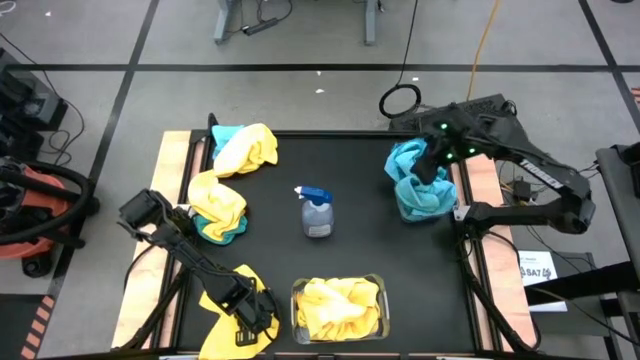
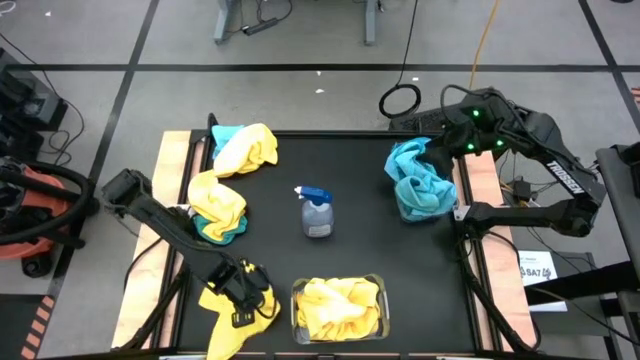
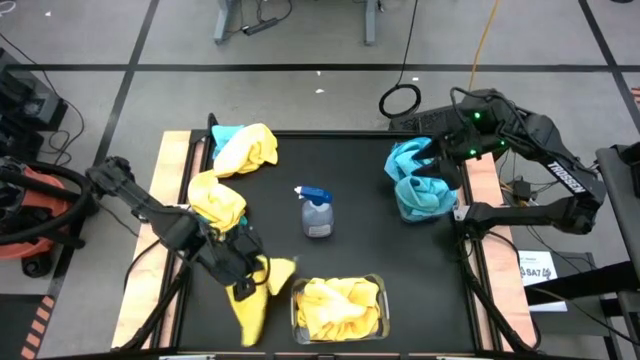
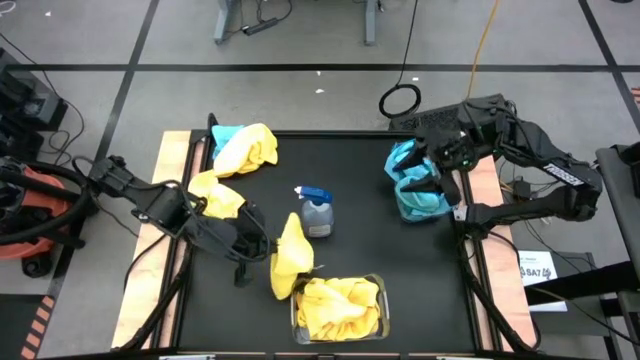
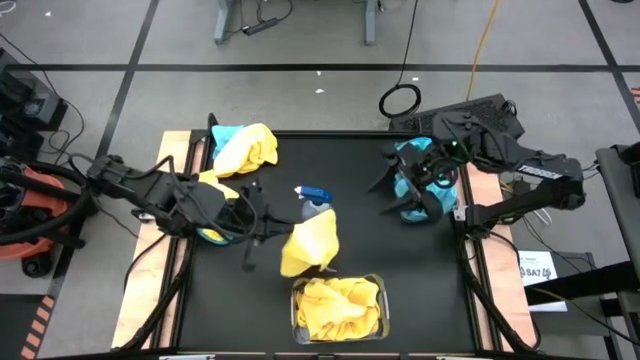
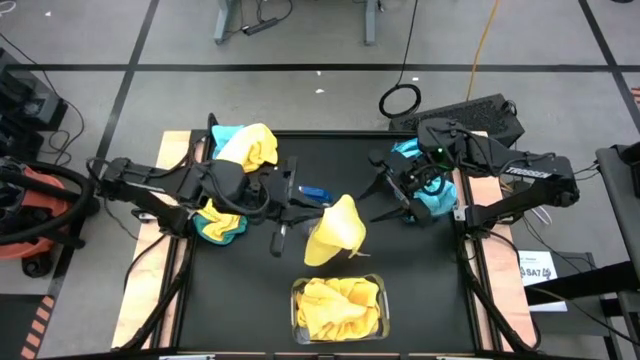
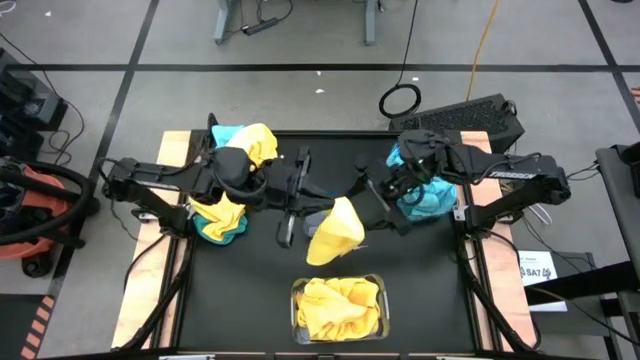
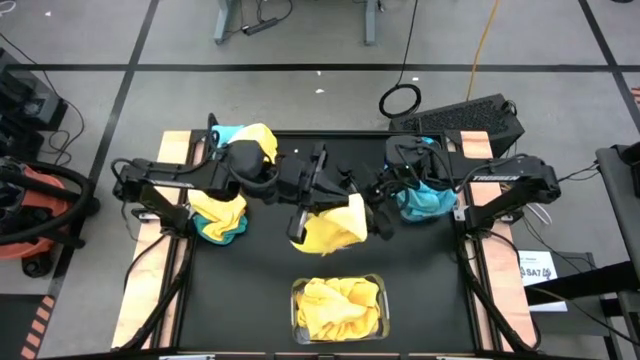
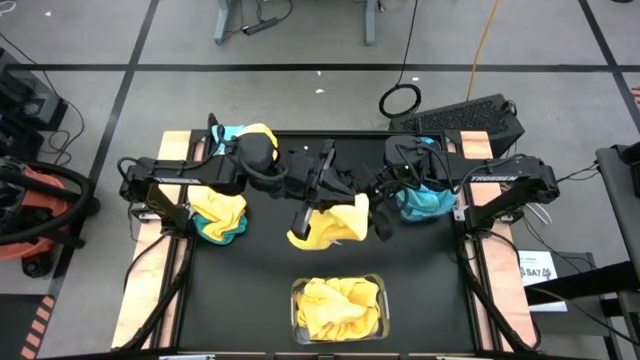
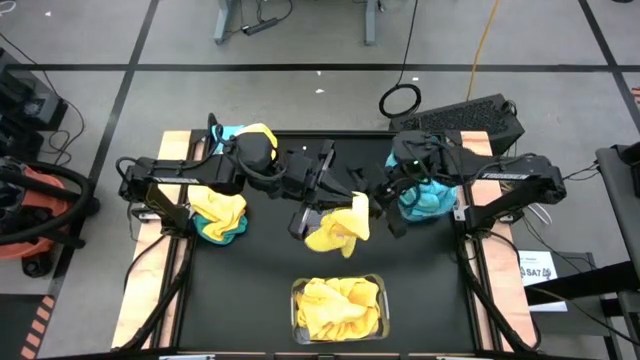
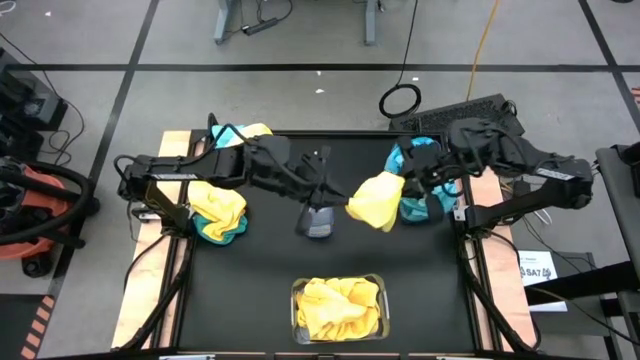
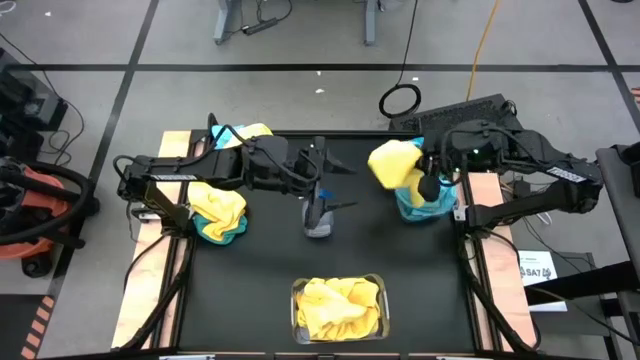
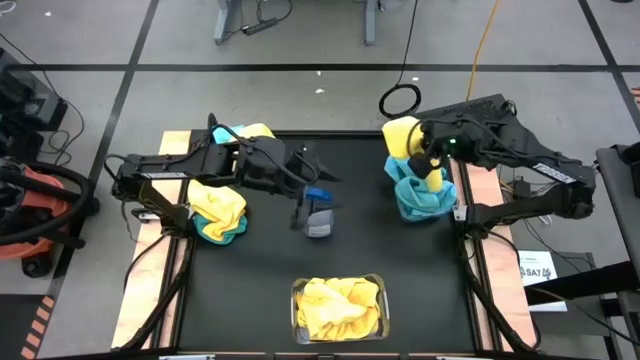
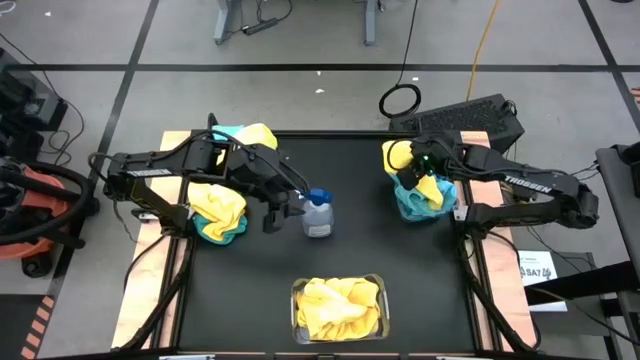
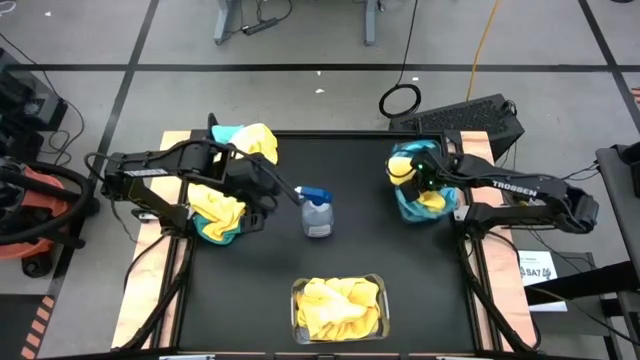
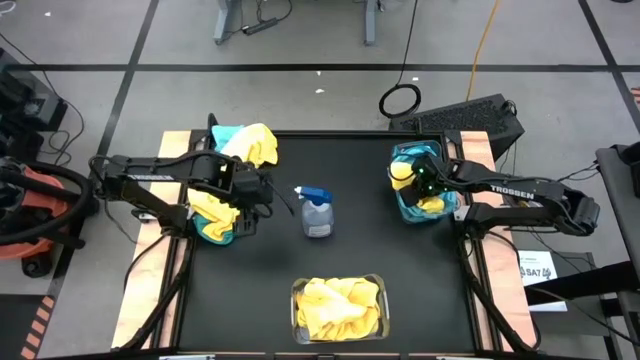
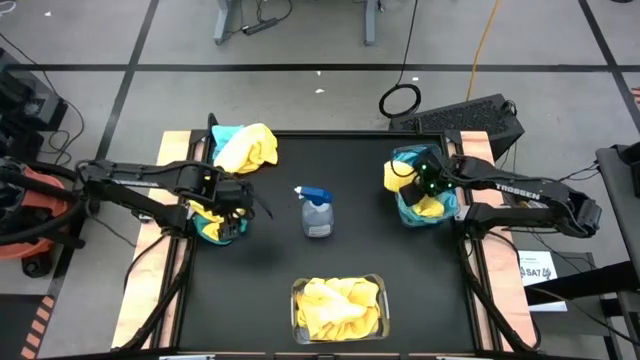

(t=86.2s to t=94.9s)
Task: Sort microfiber towel by color & place in baskets
Put the yellow towel into the bottom transparent bin

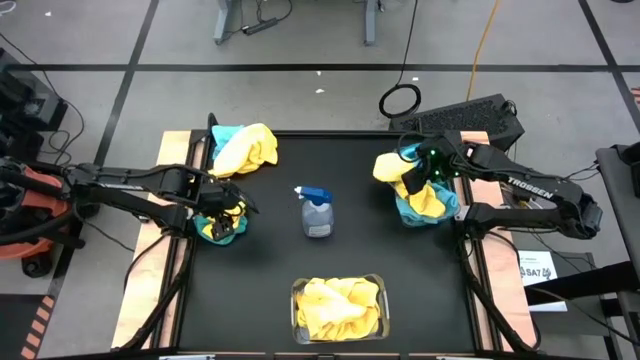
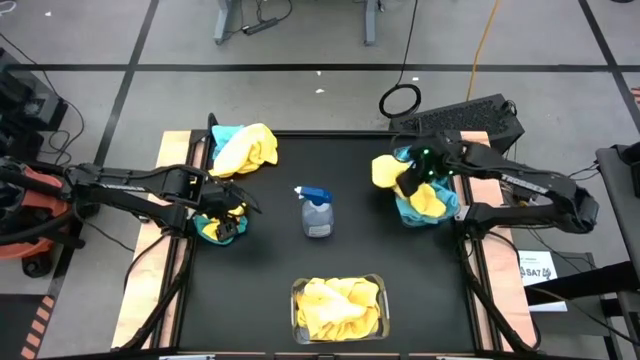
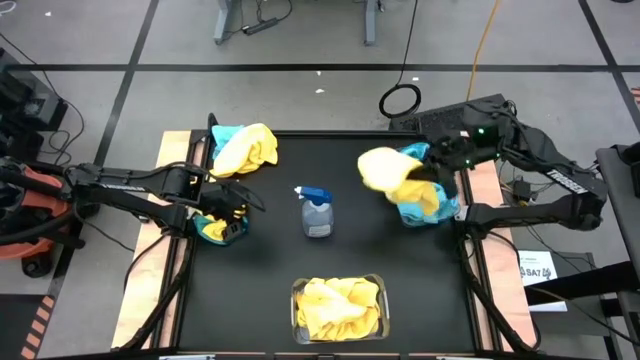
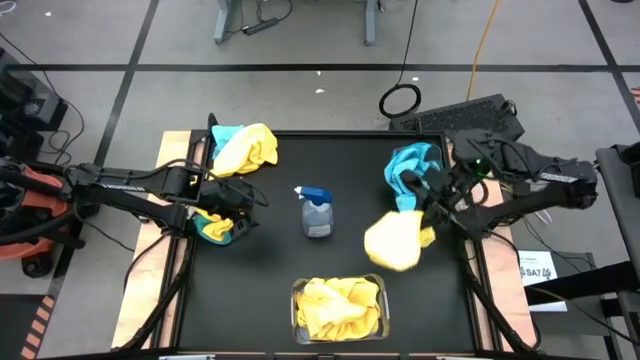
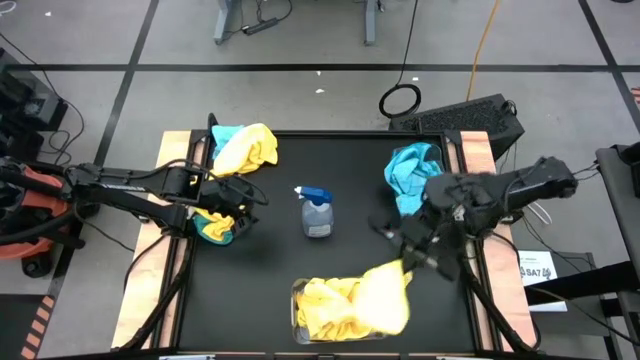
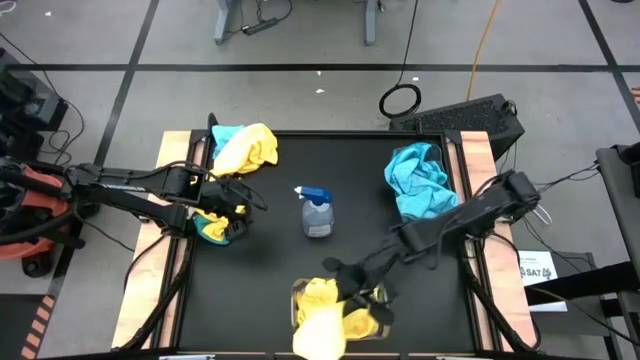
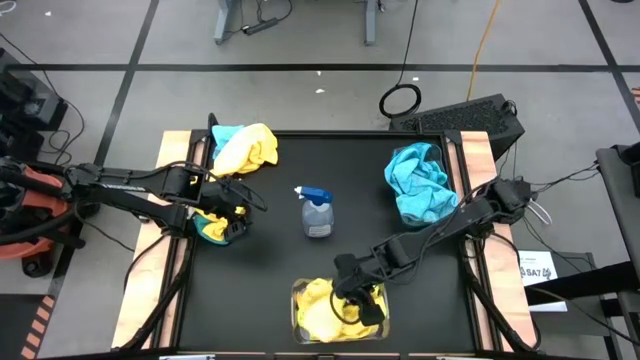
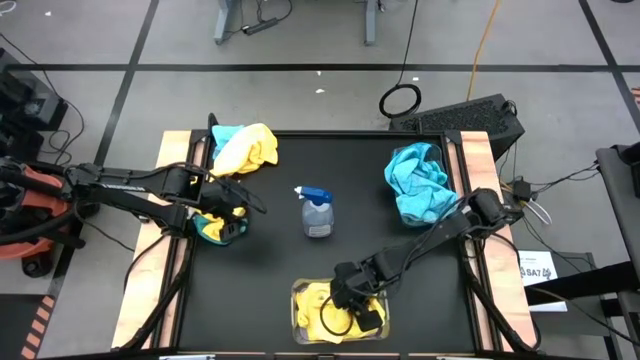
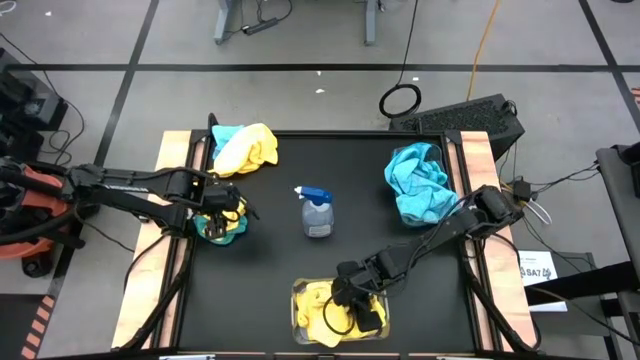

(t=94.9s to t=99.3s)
Put the yellow towel into the bottom transparent bin

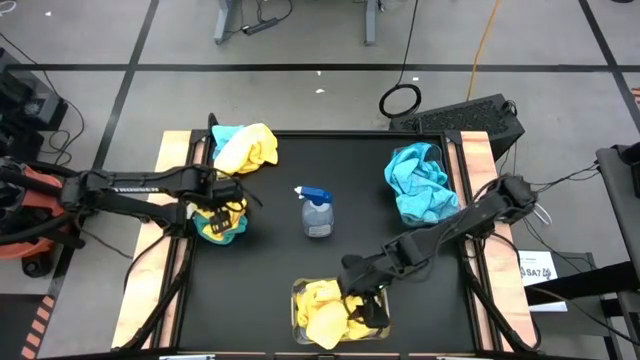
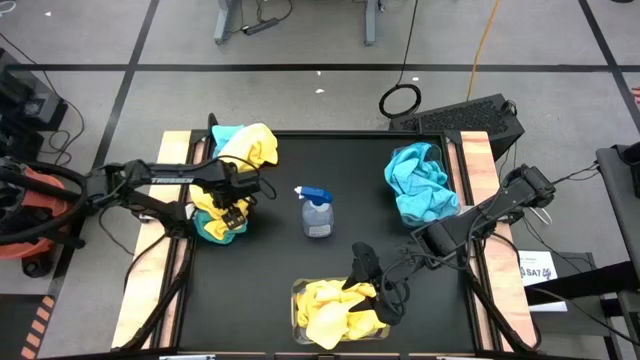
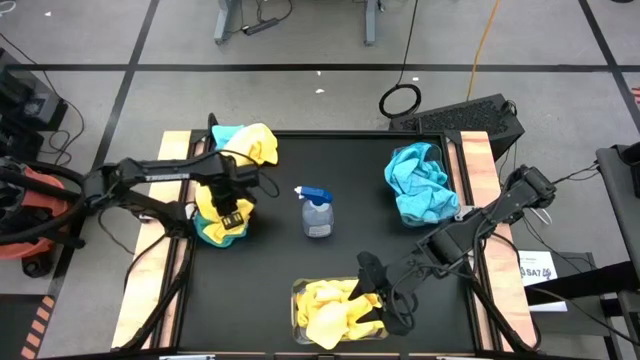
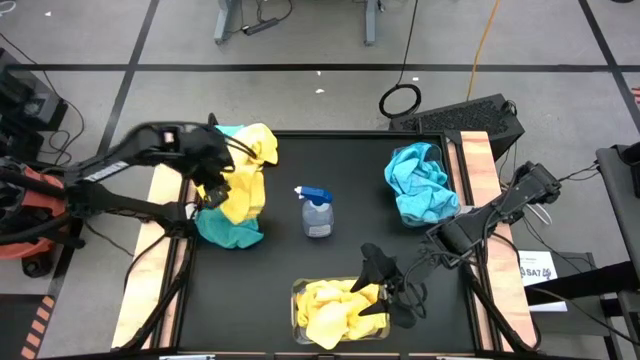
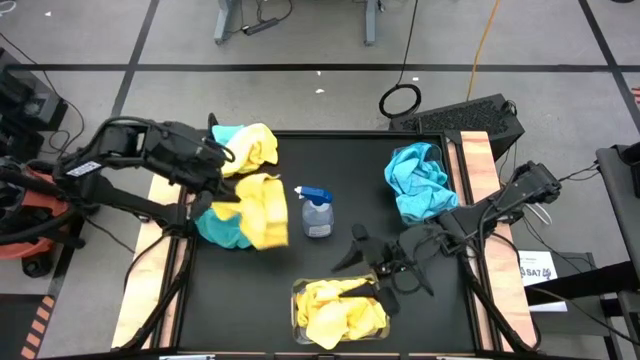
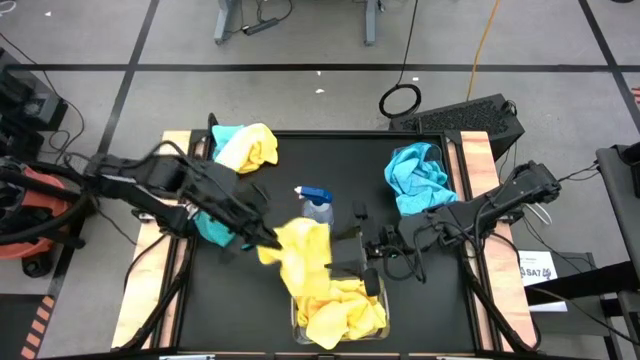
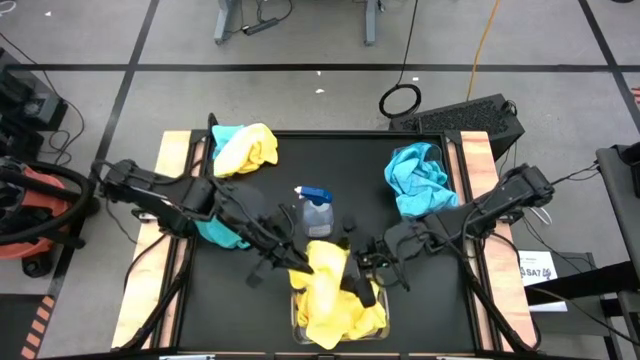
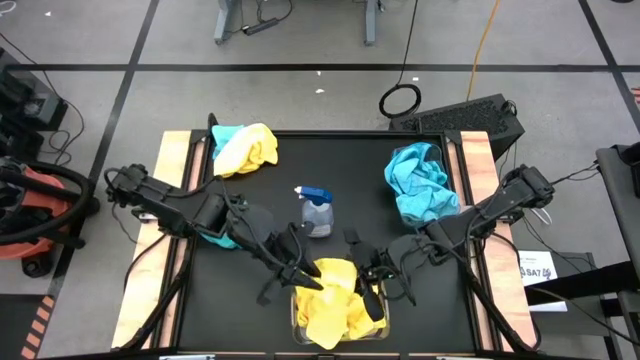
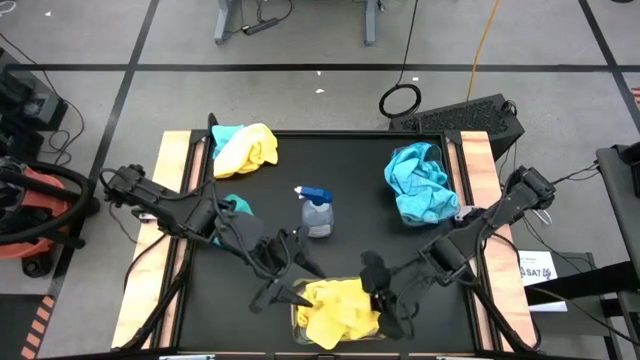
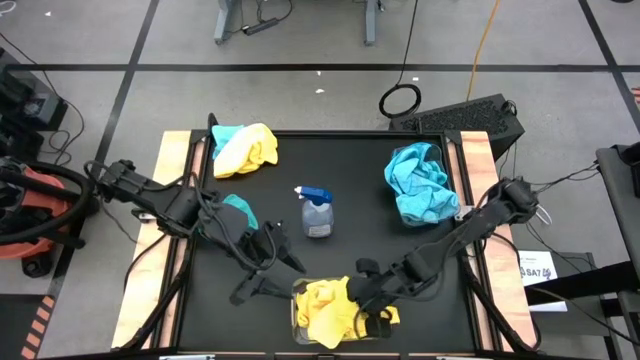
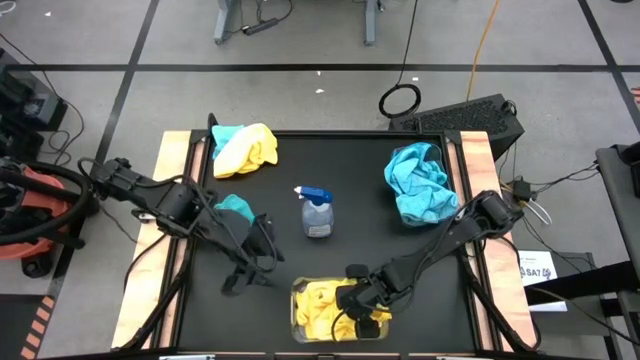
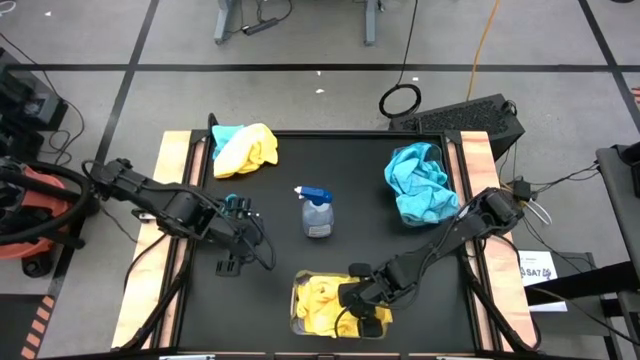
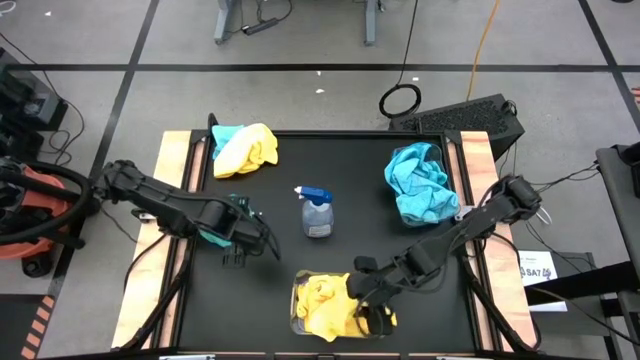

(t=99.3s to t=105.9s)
Put the yellow towel into the bottom transparent bin

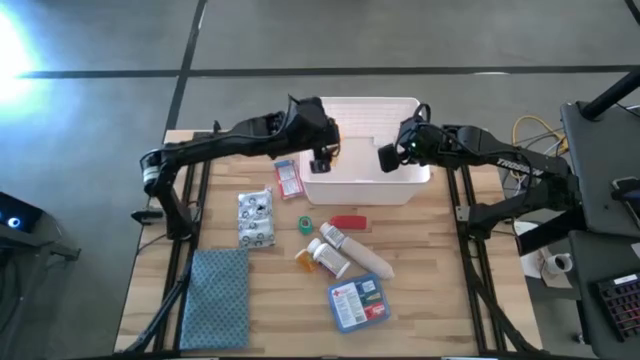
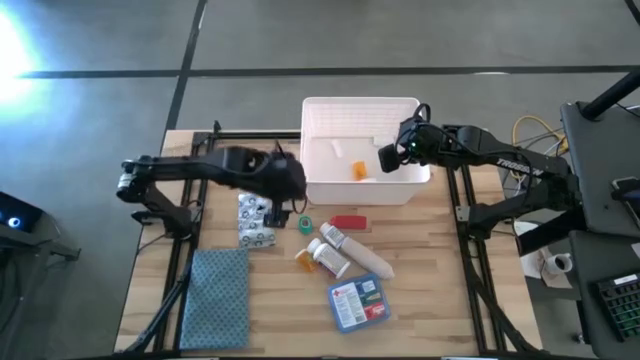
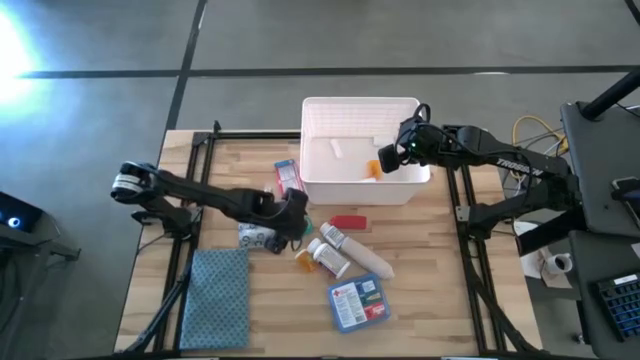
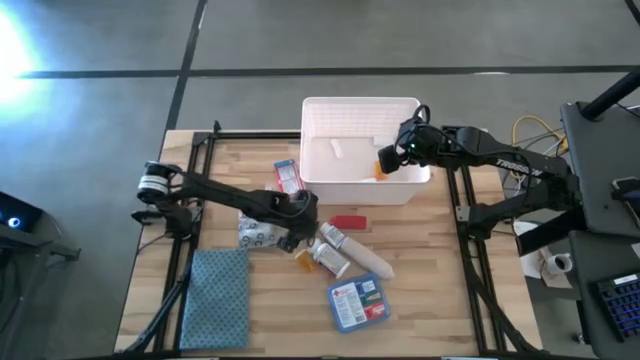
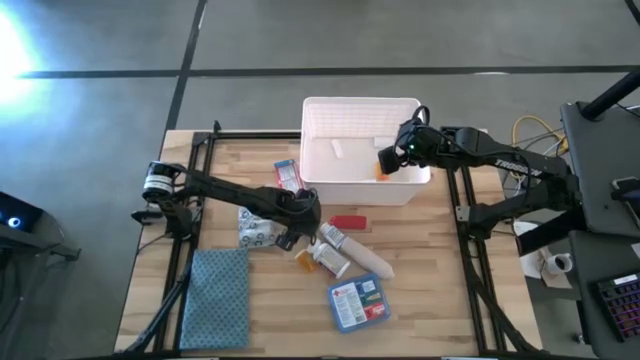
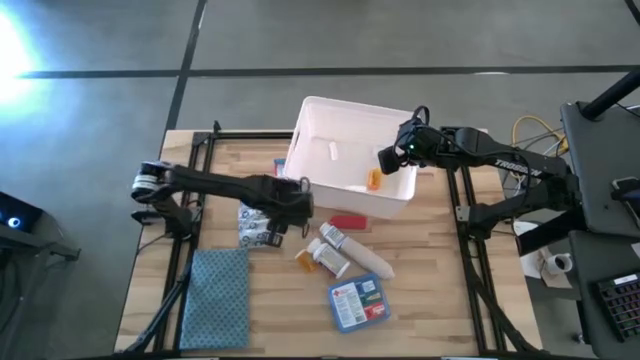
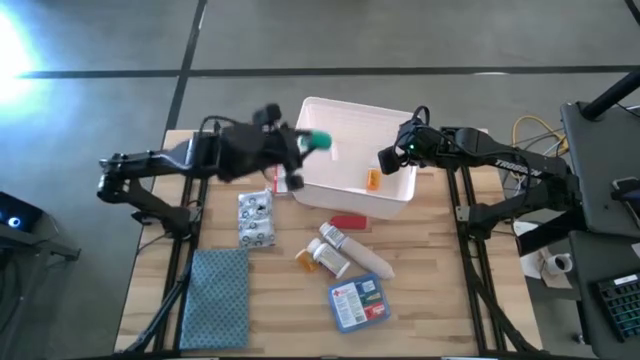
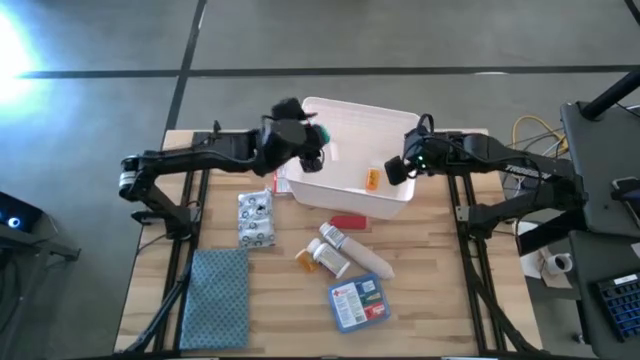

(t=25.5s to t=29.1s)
Task: Pick & place medical supplies in basket/bin
Put the green bandage into the bin
